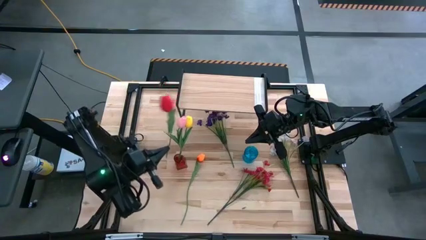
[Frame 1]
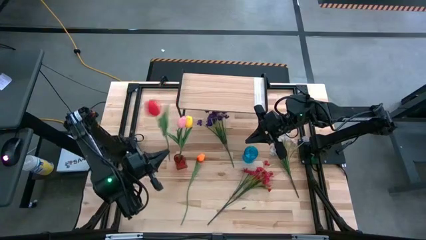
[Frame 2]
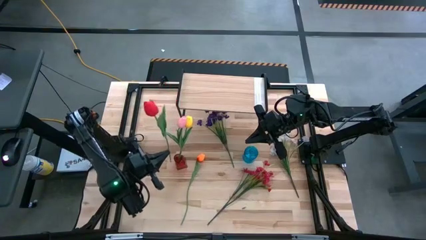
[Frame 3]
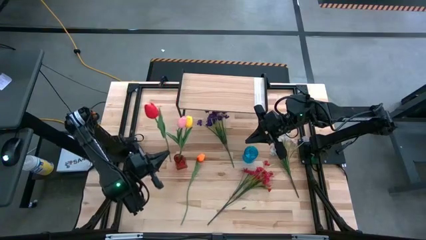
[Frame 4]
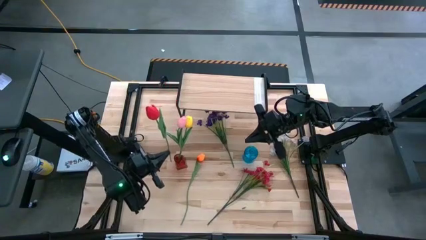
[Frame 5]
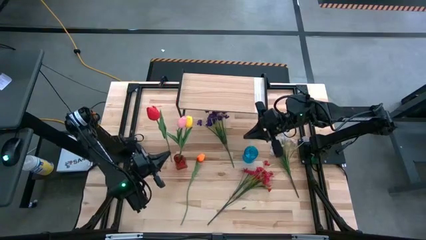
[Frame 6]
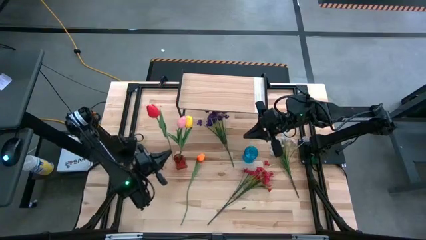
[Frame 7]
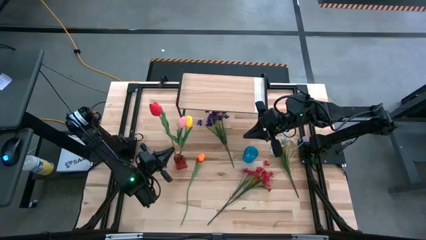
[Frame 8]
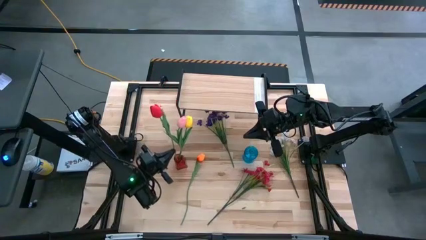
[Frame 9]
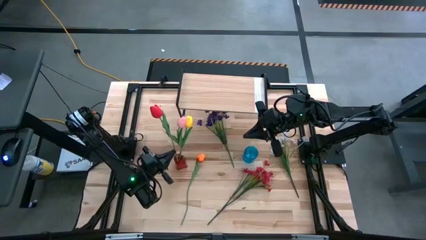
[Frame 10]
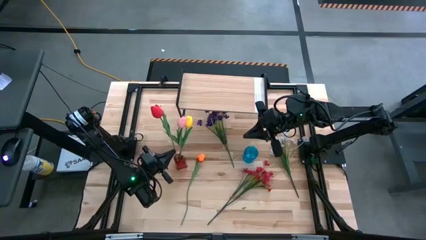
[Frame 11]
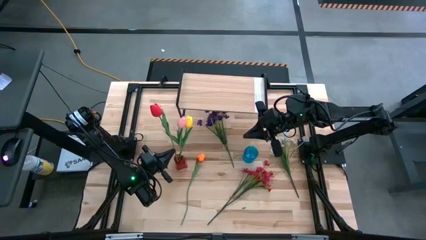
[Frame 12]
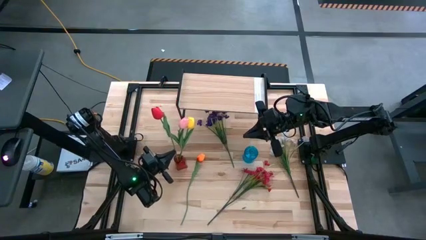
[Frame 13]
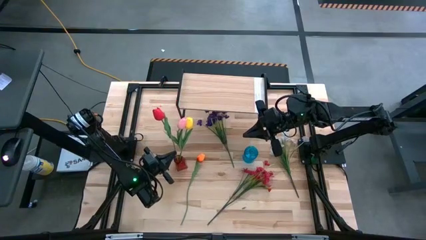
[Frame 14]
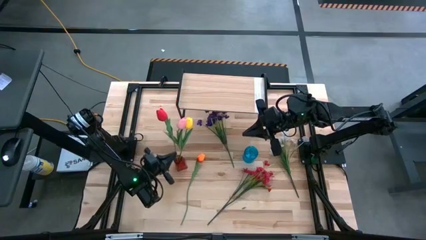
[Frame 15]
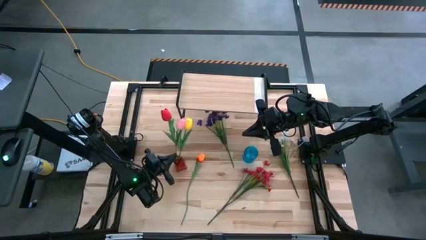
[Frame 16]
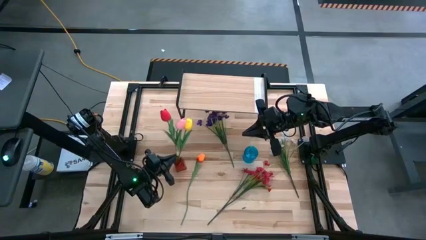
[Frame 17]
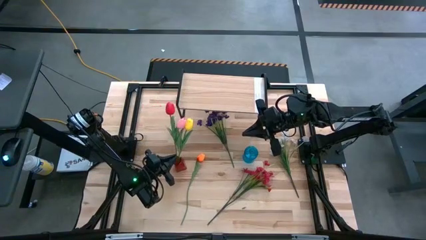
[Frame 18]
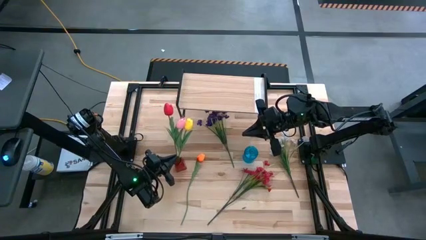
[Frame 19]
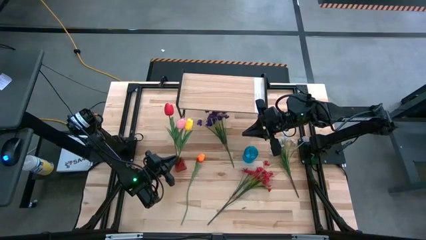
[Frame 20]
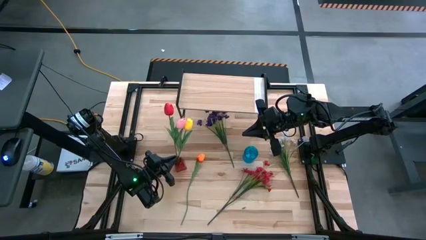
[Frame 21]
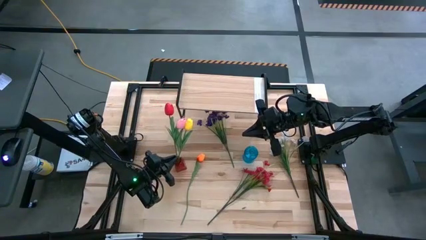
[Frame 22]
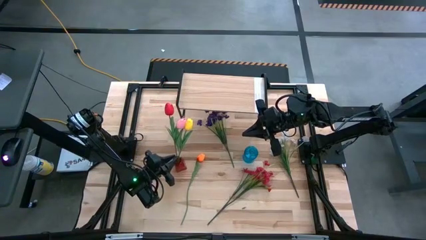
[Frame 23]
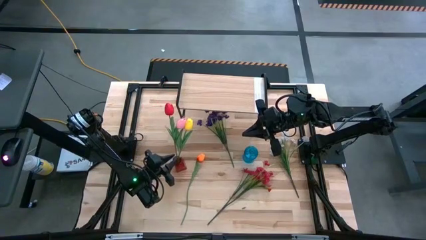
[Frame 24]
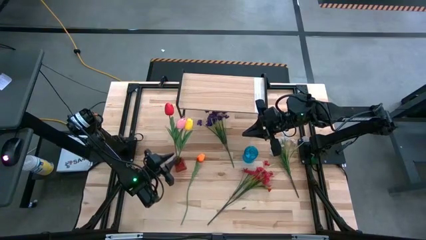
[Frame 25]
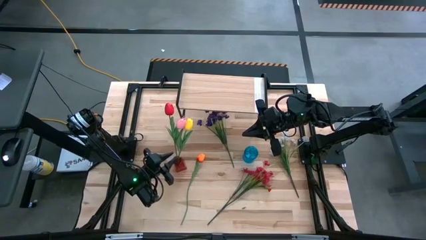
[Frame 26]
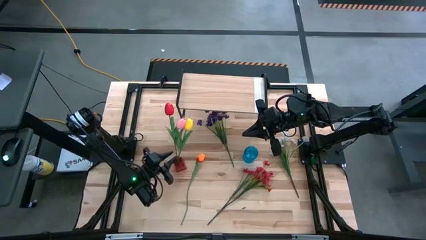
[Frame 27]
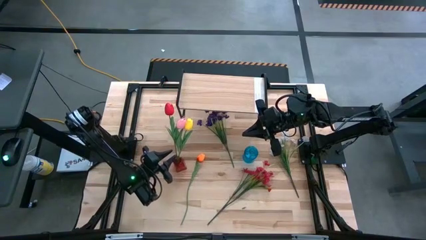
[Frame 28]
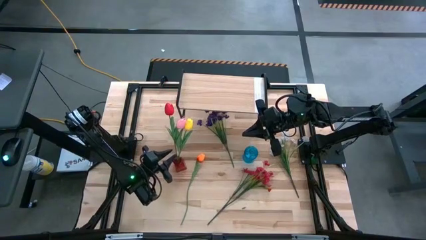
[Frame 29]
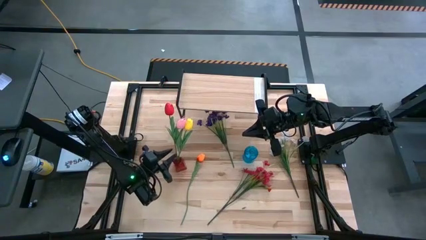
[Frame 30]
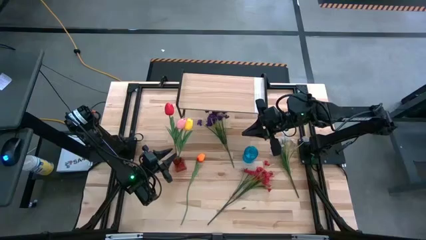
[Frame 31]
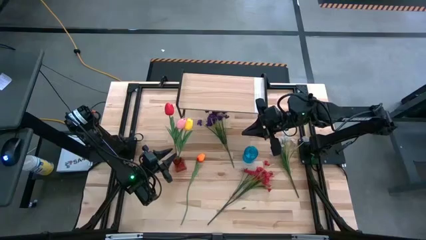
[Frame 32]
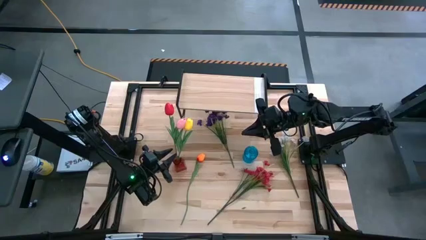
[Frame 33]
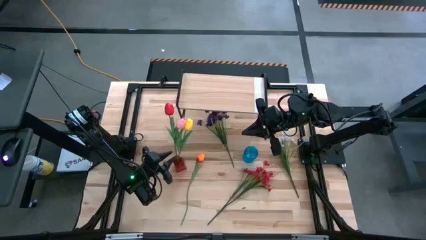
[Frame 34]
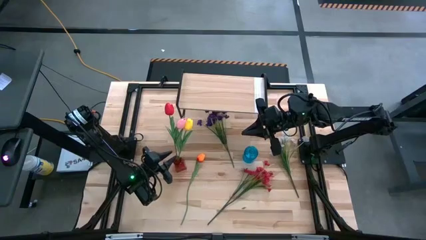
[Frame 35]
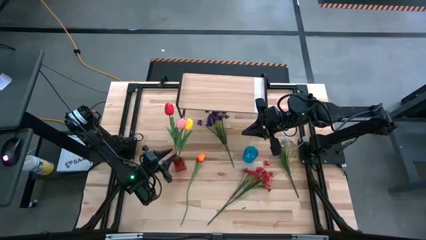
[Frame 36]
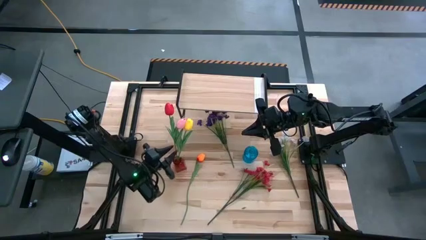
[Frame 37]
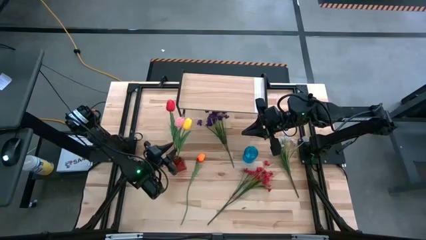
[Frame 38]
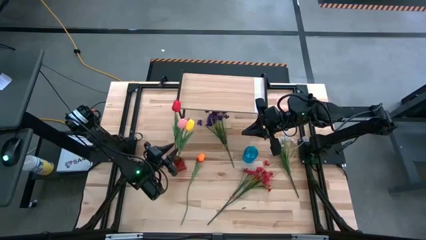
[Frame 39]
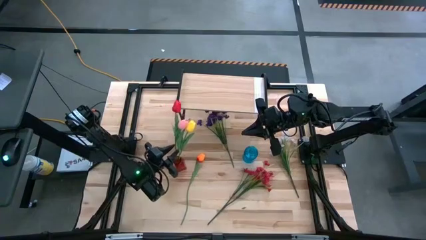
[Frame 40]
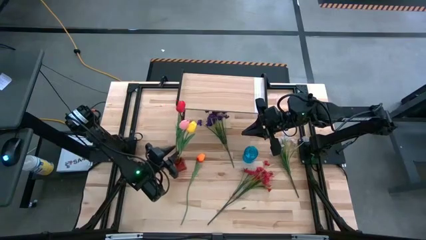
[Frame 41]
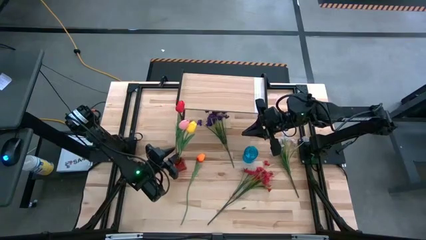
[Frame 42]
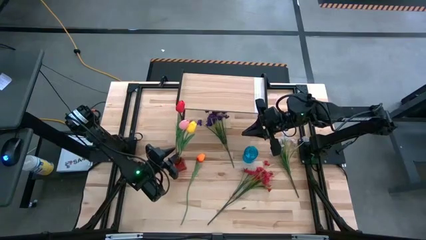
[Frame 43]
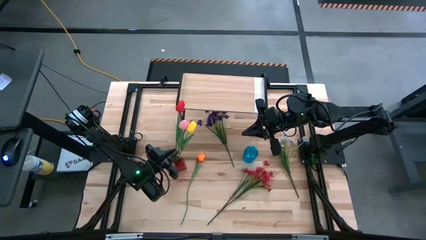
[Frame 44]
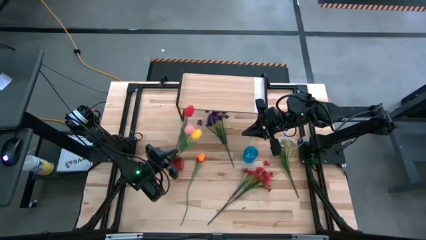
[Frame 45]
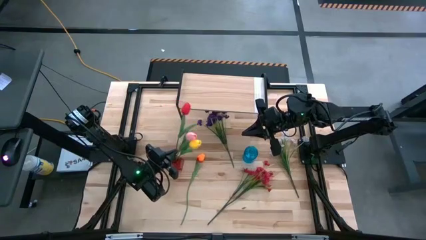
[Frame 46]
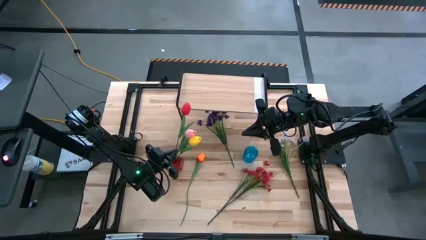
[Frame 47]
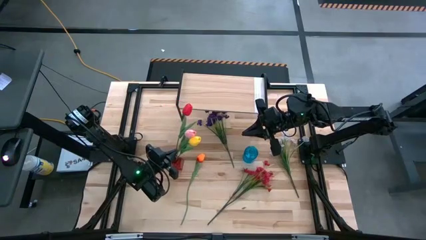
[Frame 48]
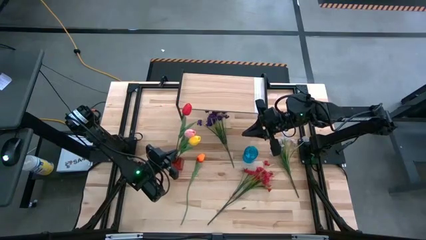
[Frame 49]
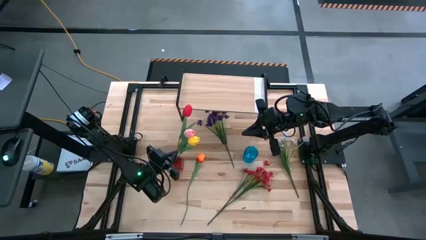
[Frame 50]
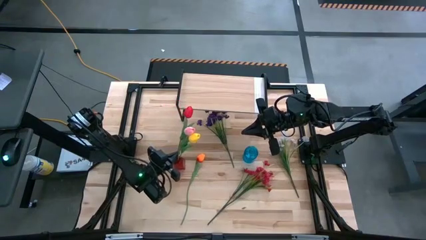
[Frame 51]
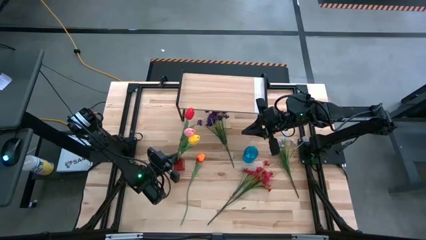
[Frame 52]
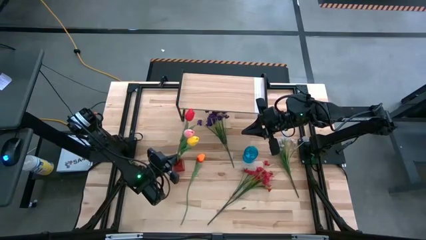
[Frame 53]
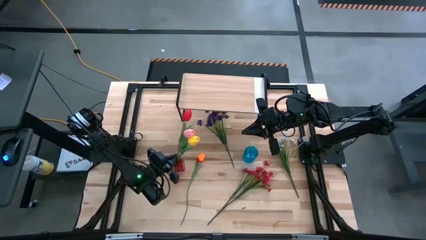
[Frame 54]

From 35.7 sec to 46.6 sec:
Task: Pick and place flowers into a vace then onto a shelf
Put the red flower into the red vase

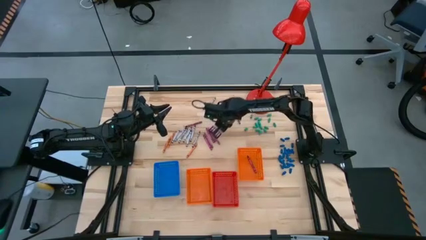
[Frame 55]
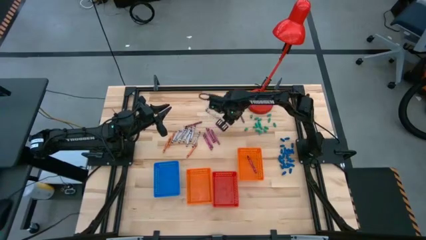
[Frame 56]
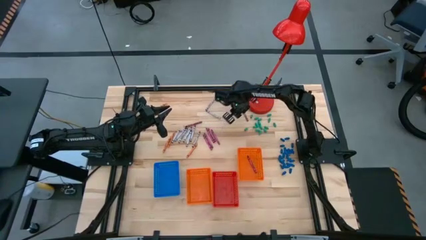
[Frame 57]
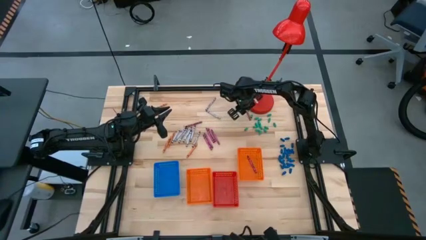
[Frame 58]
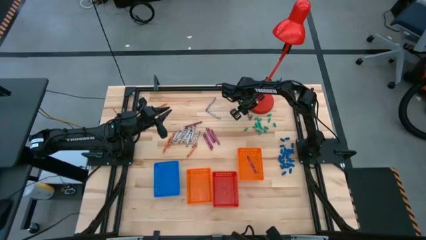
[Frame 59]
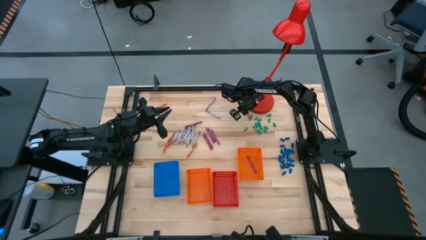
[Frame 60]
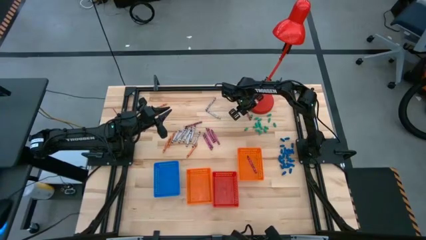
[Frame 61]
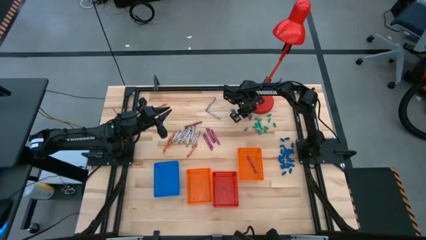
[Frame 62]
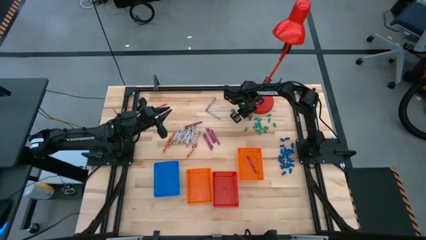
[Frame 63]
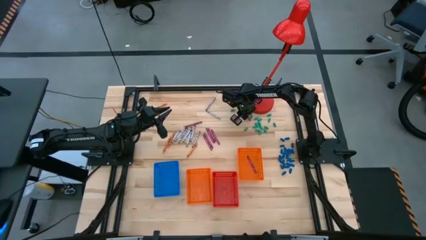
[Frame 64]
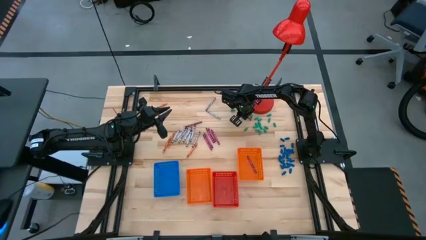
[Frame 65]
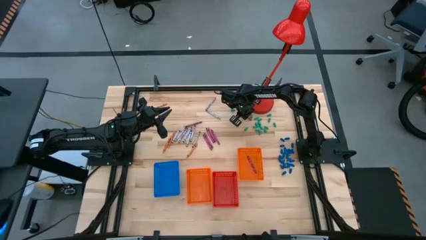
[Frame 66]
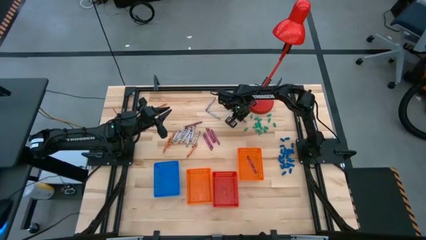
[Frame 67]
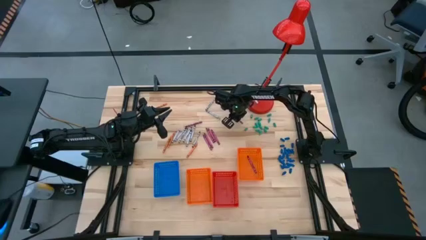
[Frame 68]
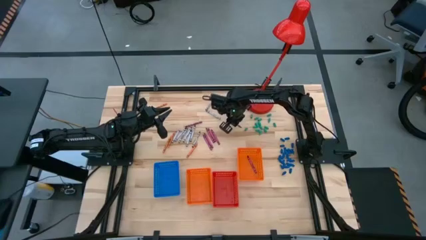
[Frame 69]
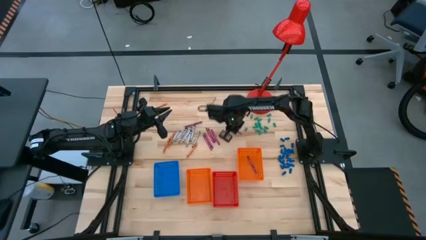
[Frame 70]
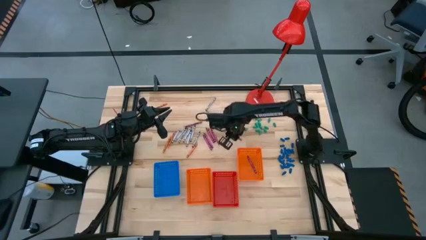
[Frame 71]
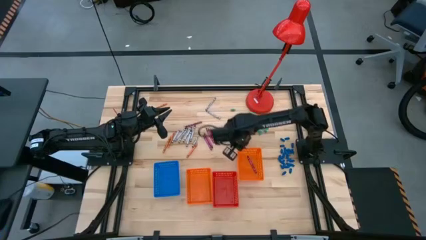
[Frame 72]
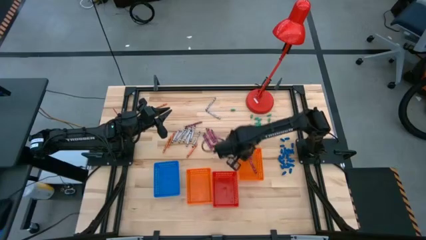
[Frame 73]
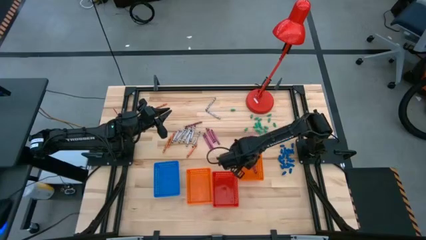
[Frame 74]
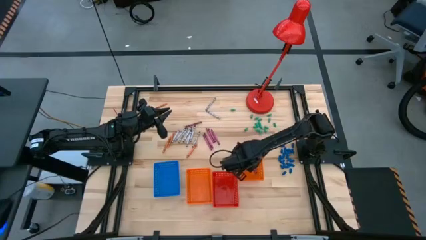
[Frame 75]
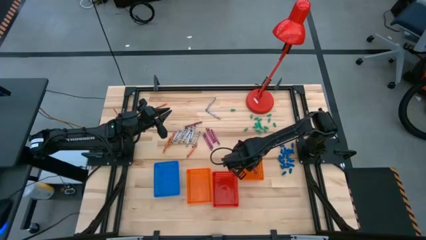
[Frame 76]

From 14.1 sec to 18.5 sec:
Task: Sort crayons
Put the red crayon into the right orange bin
